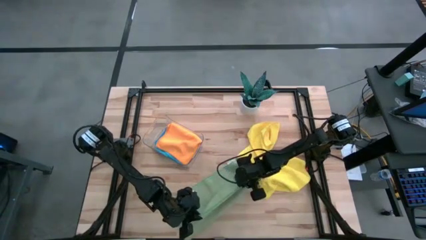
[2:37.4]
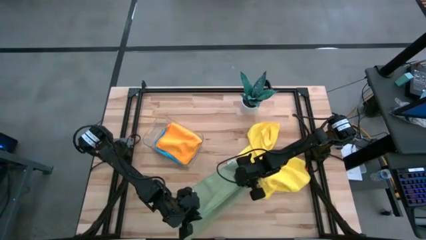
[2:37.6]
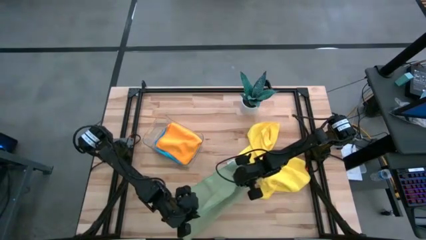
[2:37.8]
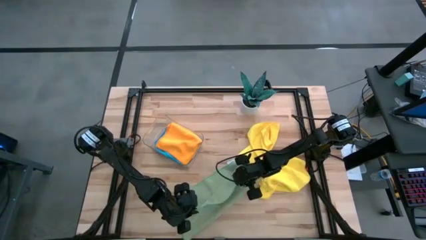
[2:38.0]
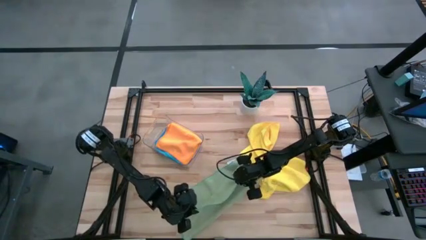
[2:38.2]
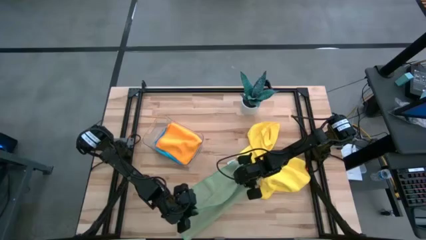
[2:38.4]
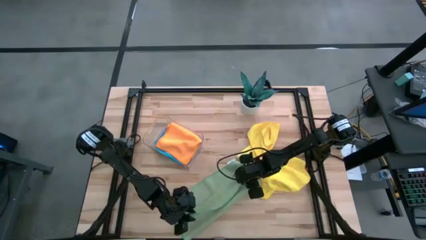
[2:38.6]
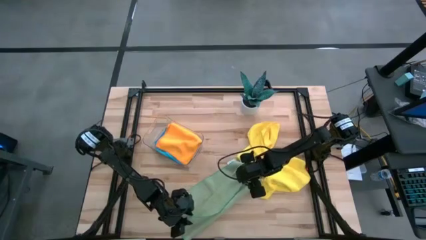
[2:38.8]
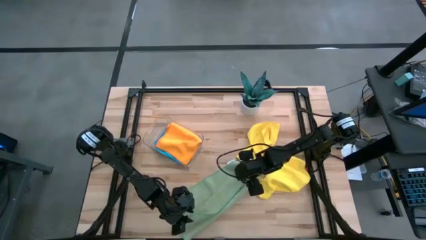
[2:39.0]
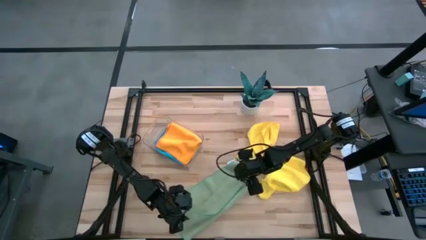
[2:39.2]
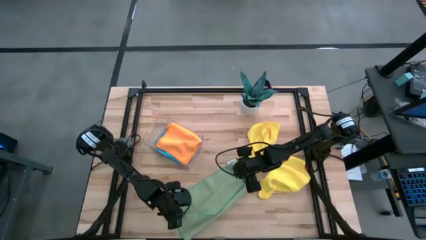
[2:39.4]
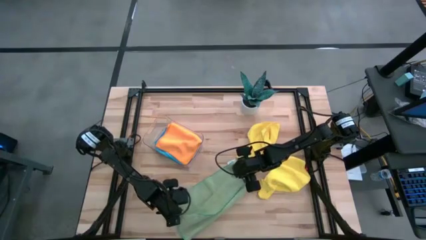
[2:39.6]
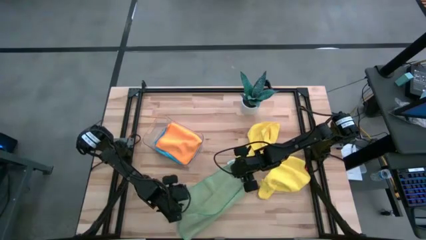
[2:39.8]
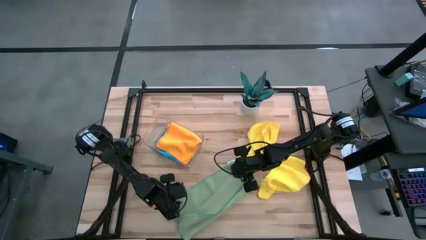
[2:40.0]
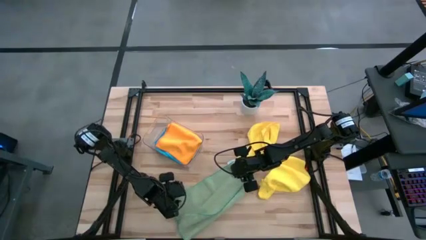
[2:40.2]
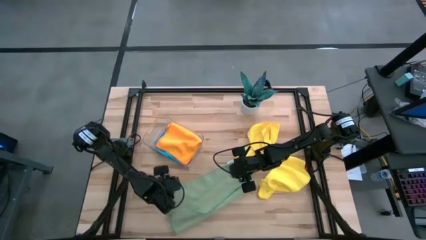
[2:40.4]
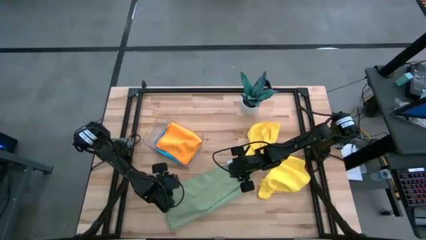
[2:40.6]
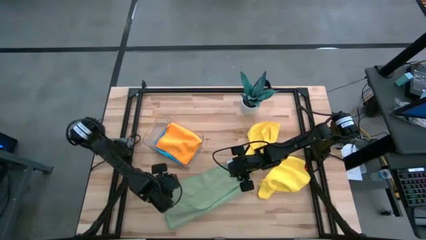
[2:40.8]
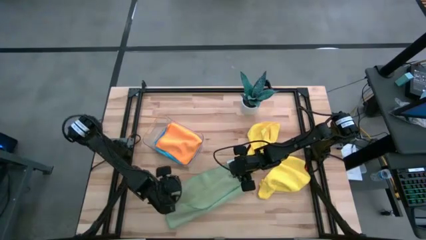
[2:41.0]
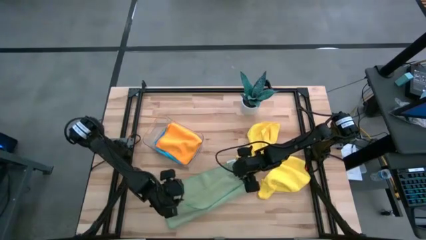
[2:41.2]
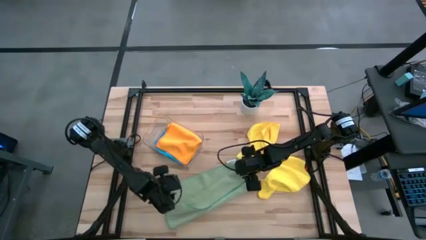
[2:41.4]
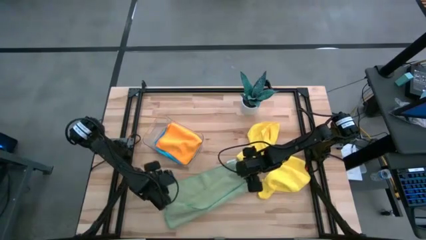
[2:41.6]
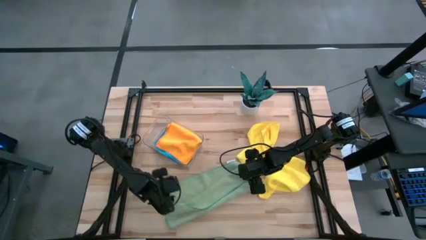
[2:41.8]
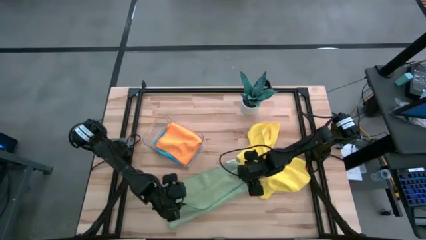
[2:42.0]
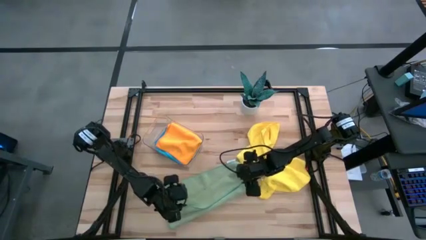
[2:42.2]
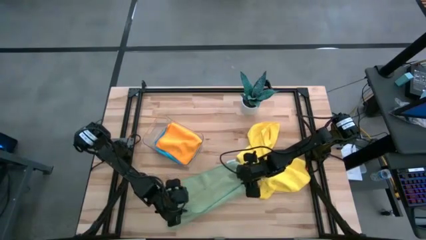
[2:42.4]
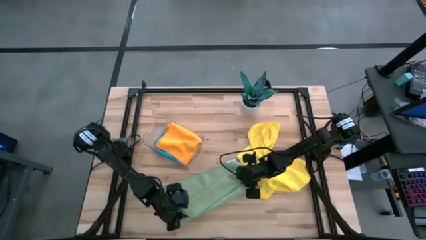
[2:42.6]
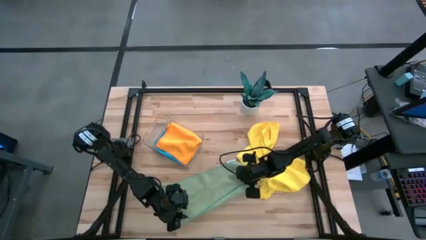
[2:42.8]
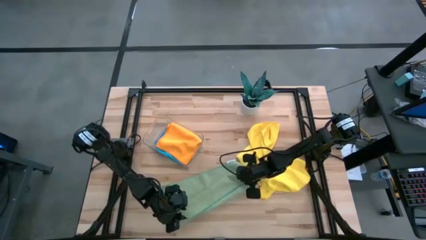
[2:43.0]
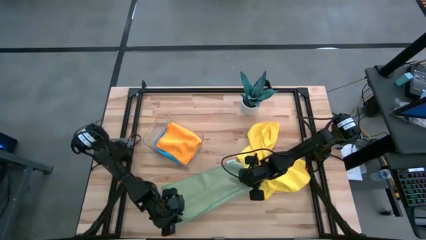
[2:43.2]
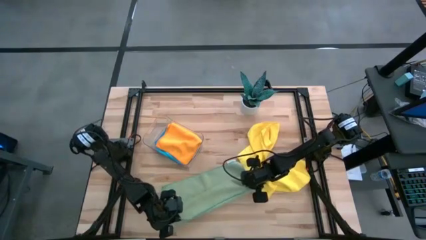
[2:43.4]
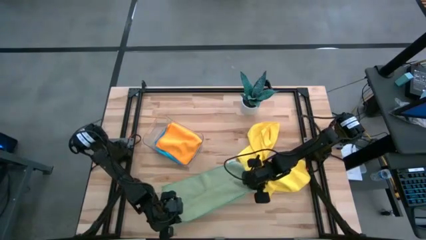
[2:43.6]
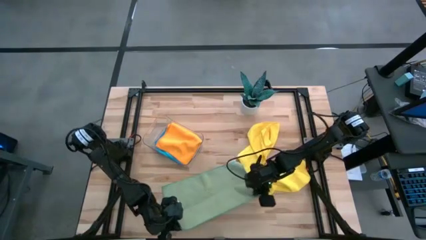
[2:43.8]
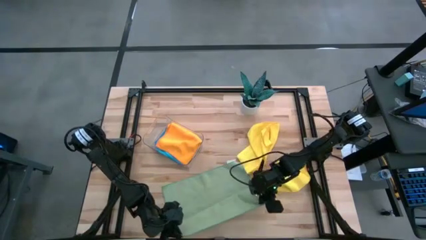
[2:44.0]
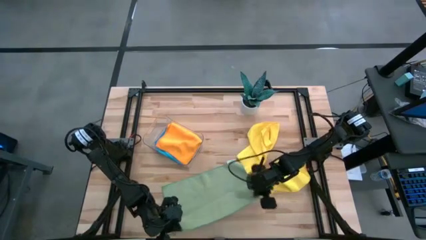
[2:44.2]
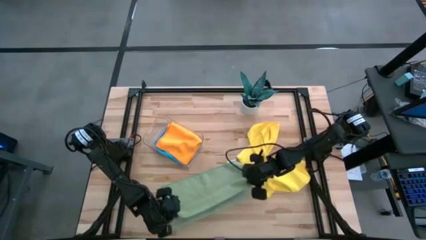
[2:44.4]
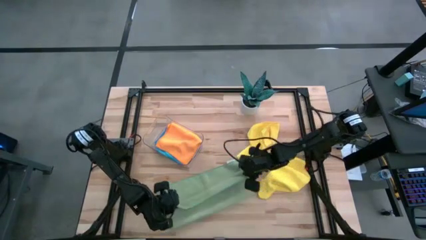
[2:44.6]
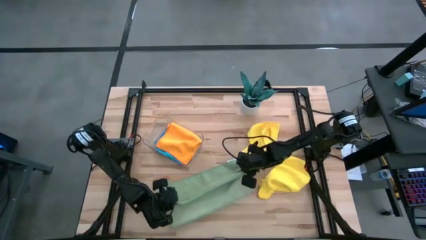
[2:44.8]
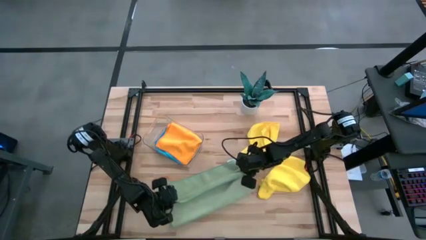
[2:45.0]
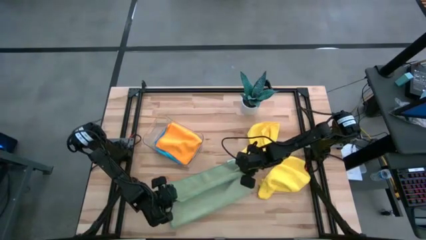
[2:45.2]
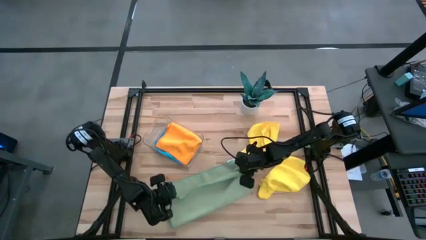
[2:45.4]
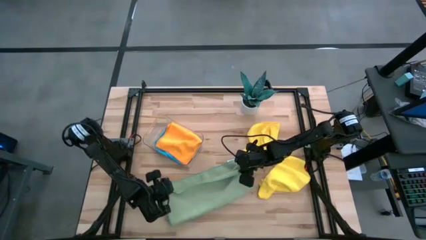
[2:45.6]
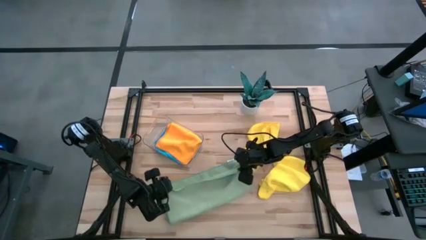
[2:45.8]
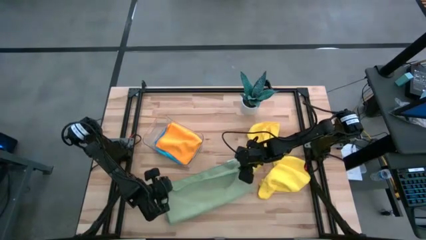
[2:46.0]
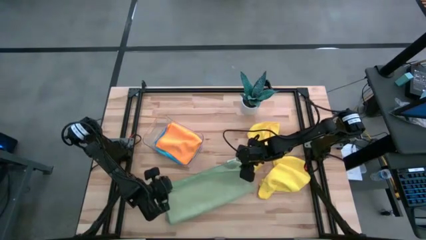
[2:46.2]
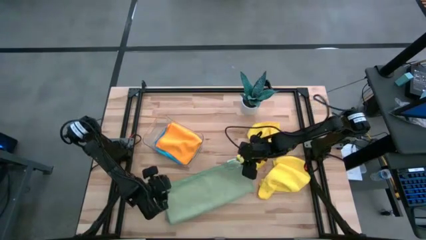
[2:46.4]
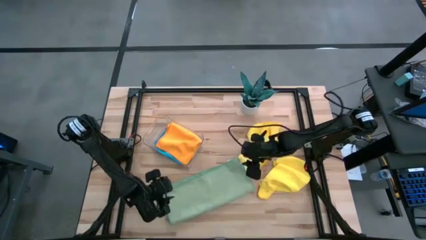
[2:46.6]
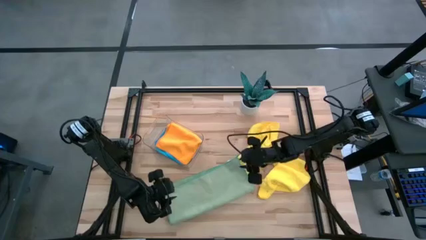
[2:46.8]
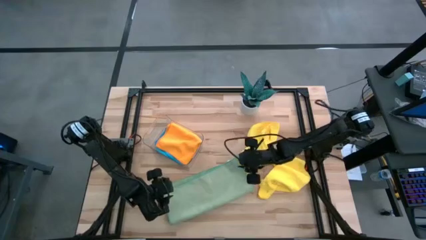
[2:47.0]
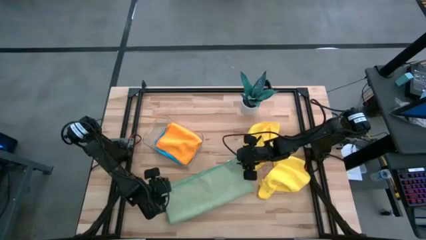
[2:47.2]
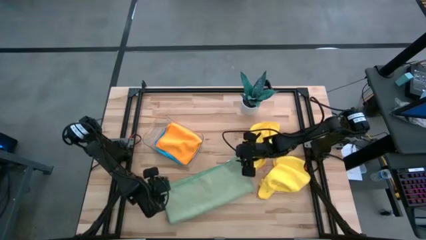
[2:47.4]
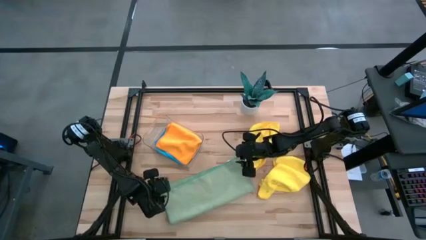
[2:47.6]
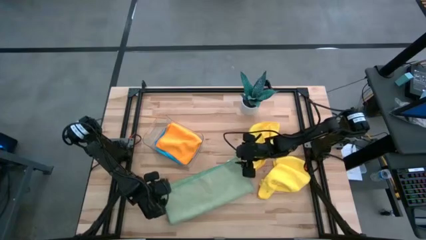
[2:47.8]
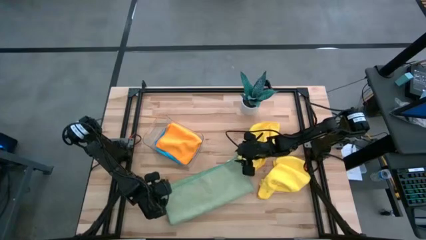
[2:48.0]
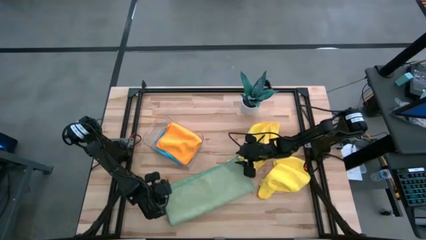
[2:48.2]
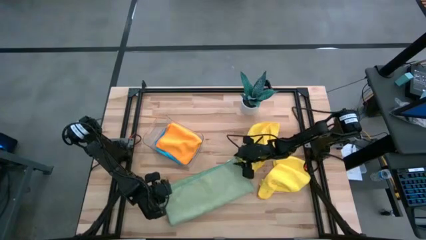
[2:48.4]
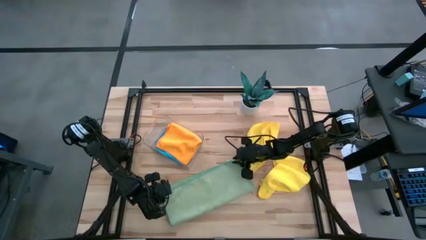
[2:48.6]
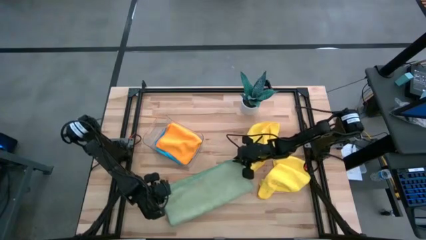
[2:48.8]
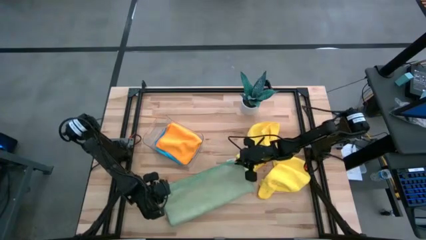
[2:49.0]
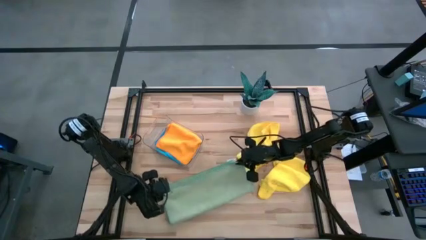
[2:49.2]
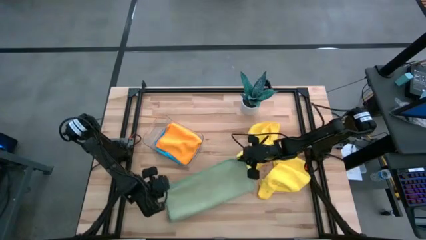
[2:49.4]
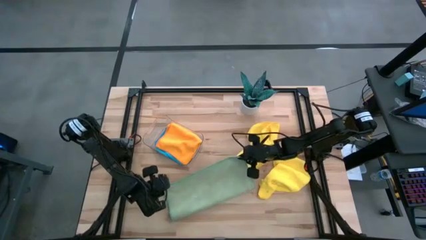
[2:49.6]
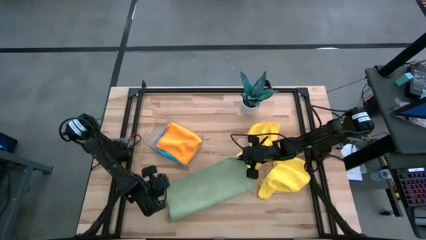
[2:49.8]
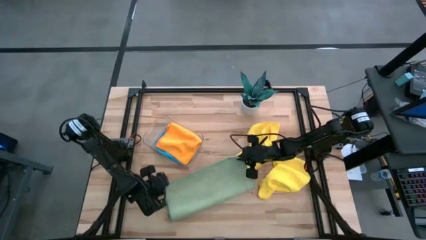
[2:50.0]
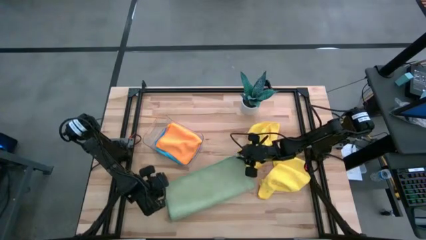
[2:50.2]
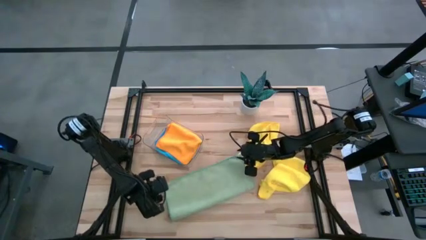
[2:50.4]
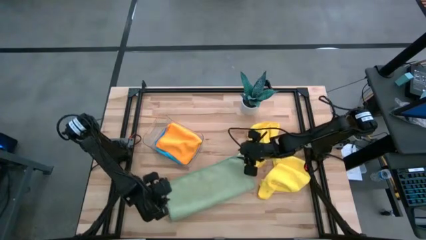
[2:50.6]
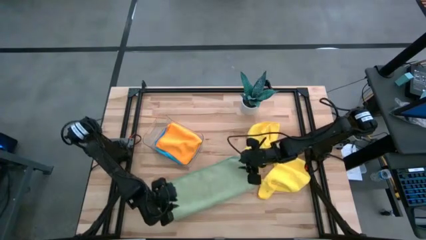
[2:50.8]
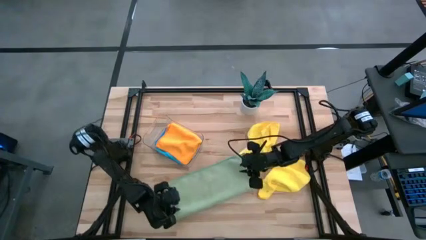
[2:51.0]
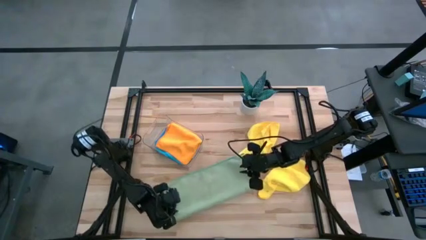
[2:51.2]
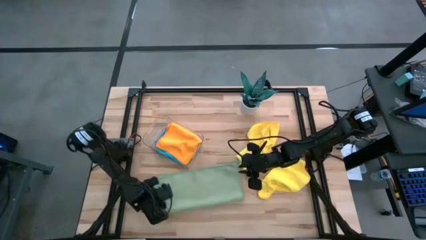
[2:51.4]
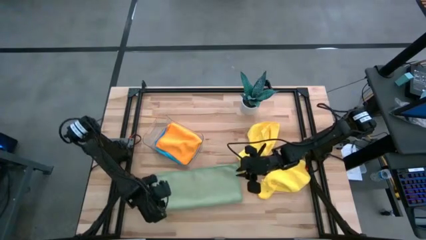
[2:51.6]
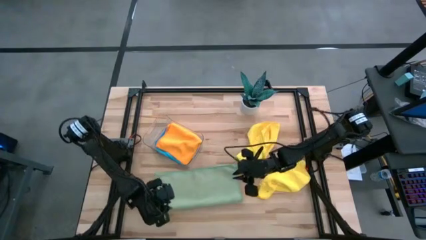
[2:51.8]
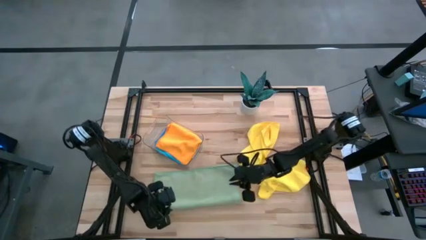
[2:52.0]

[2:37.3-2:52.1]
Task: Fold microfiber towels
Fold the green microfiber cloth
